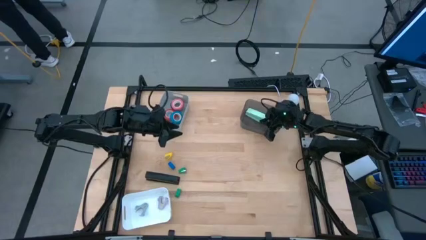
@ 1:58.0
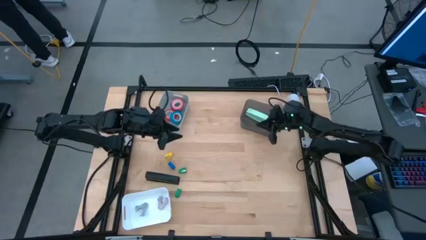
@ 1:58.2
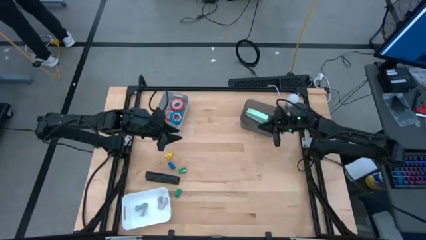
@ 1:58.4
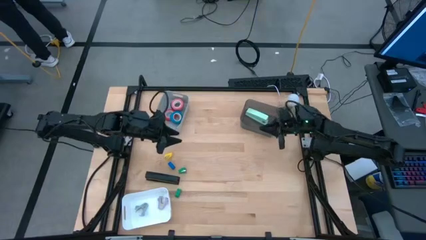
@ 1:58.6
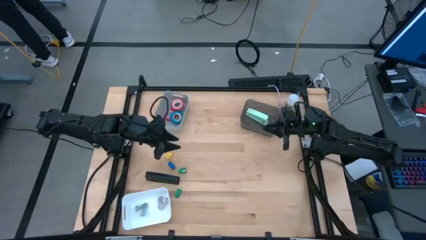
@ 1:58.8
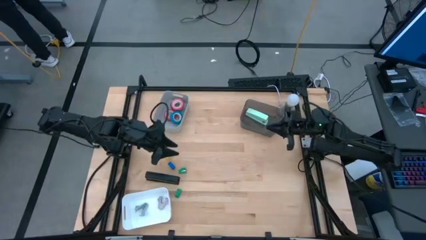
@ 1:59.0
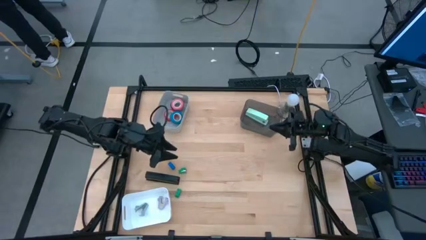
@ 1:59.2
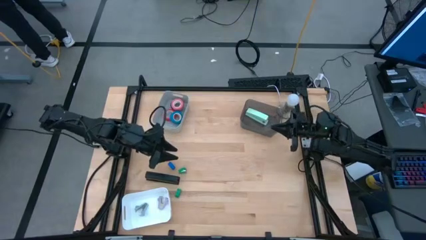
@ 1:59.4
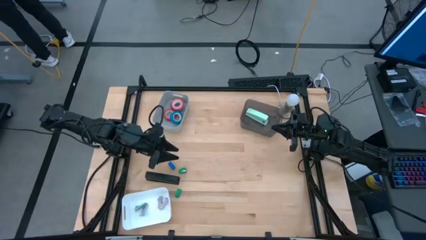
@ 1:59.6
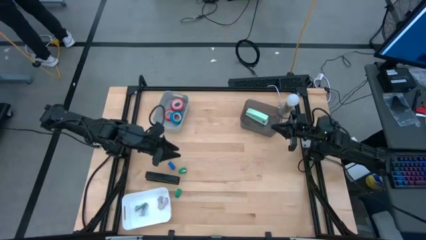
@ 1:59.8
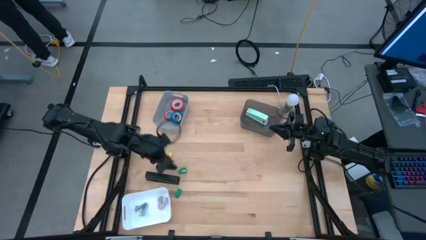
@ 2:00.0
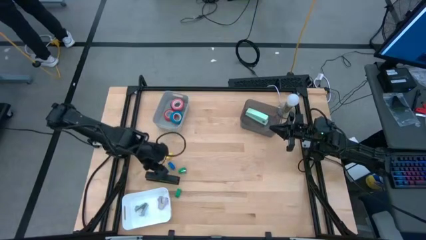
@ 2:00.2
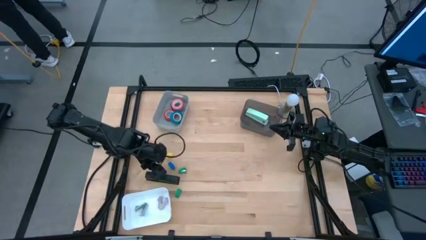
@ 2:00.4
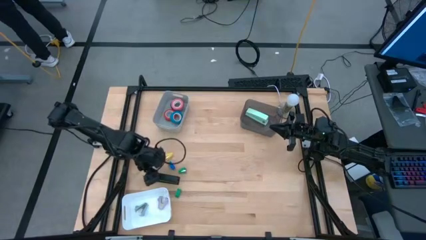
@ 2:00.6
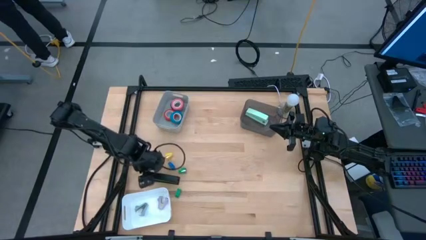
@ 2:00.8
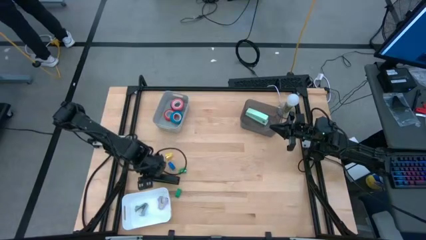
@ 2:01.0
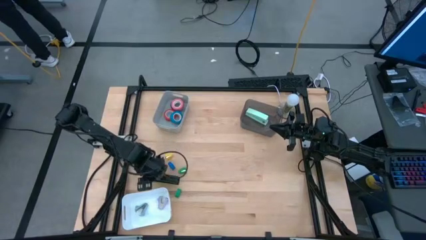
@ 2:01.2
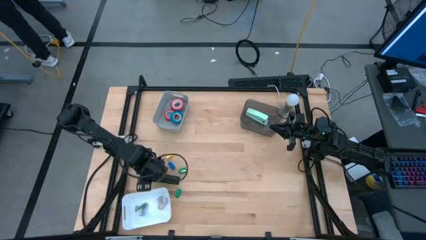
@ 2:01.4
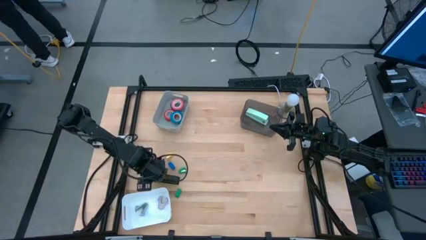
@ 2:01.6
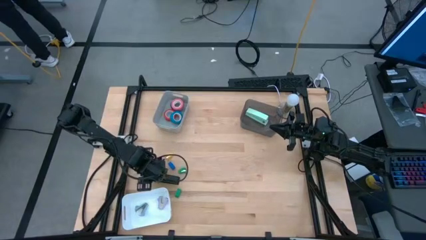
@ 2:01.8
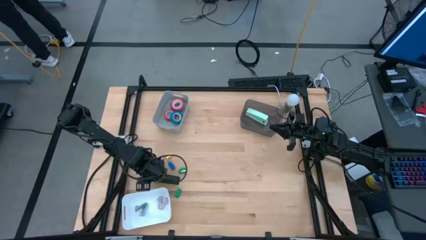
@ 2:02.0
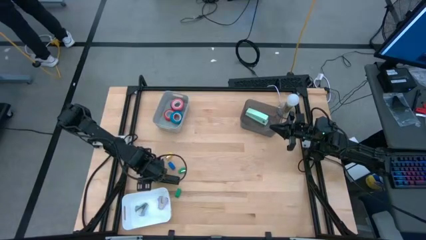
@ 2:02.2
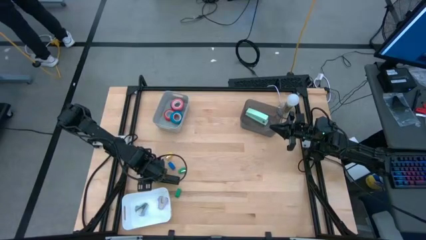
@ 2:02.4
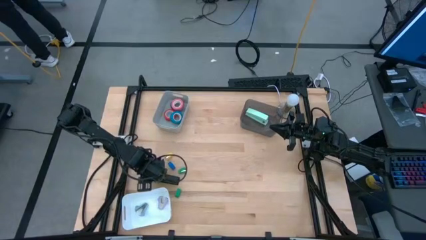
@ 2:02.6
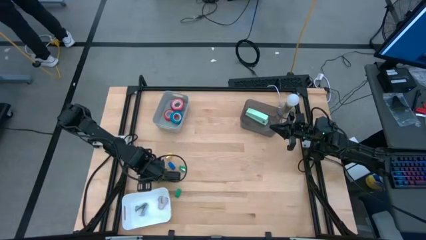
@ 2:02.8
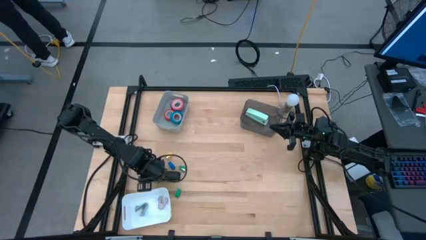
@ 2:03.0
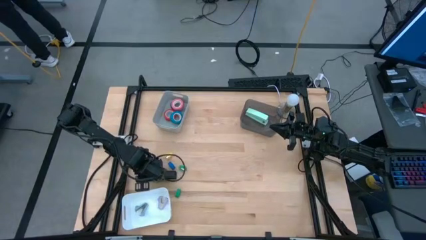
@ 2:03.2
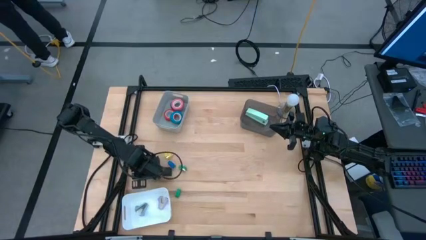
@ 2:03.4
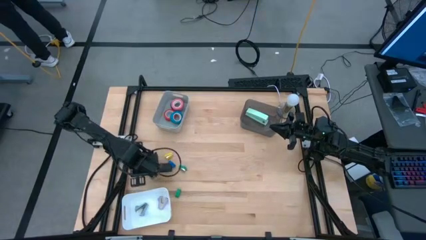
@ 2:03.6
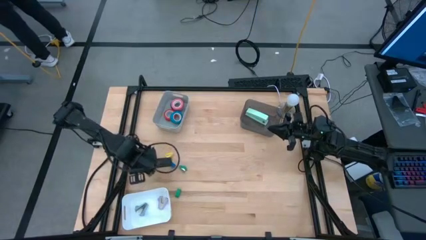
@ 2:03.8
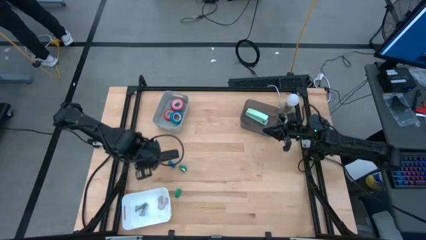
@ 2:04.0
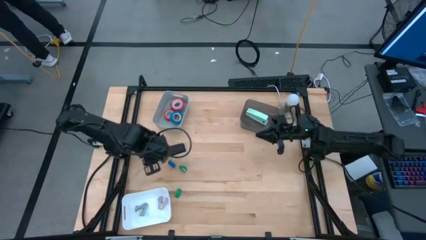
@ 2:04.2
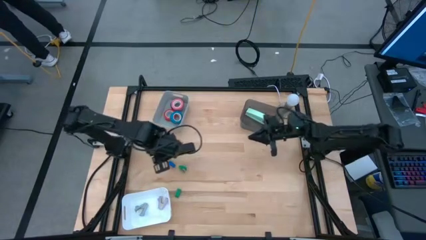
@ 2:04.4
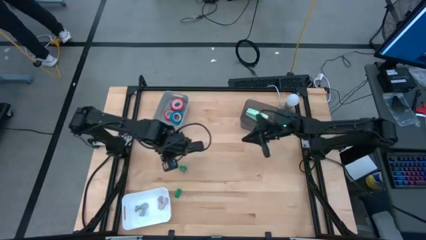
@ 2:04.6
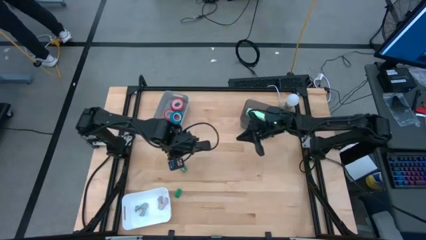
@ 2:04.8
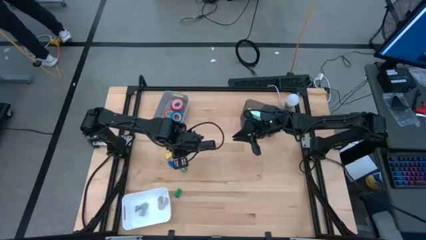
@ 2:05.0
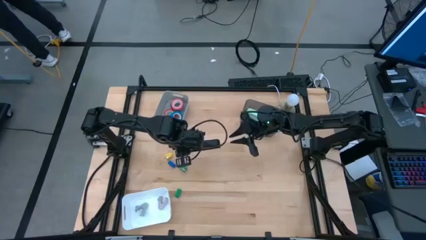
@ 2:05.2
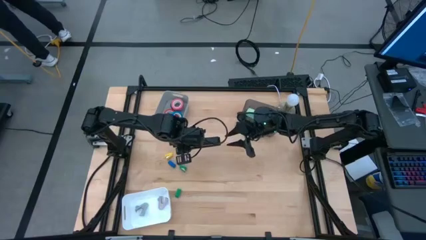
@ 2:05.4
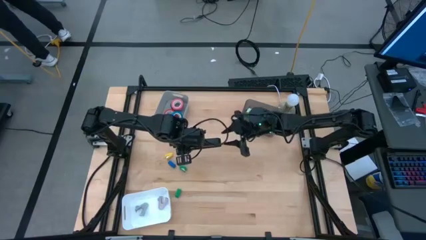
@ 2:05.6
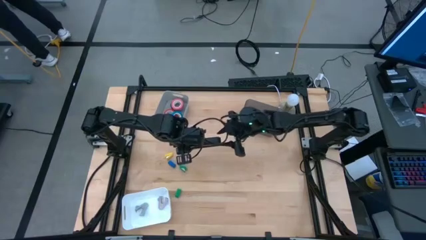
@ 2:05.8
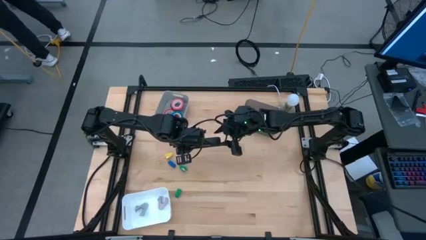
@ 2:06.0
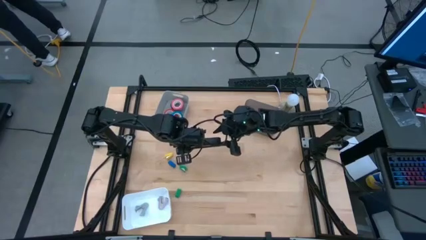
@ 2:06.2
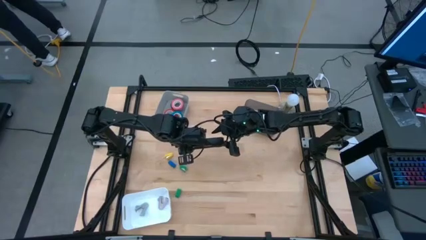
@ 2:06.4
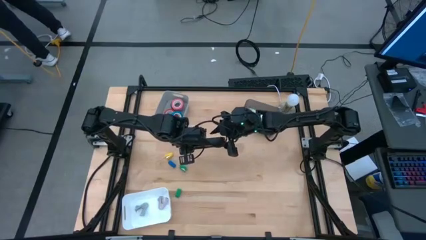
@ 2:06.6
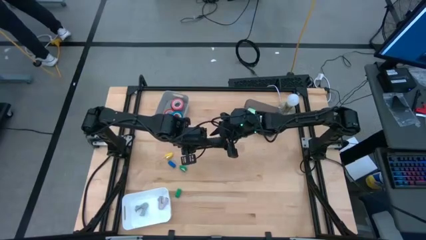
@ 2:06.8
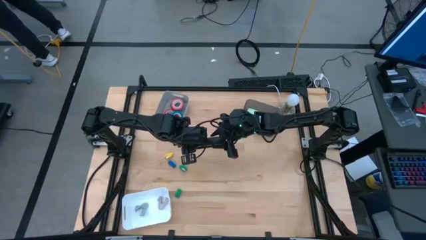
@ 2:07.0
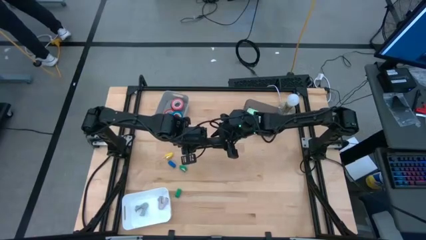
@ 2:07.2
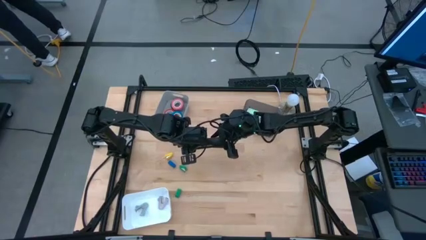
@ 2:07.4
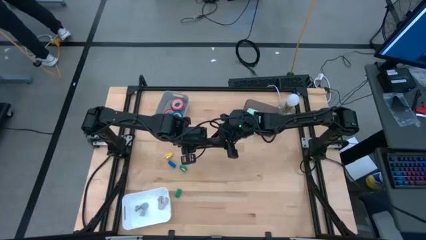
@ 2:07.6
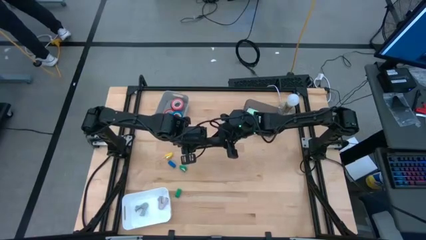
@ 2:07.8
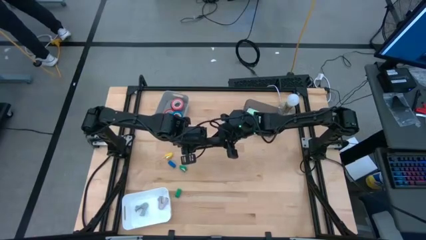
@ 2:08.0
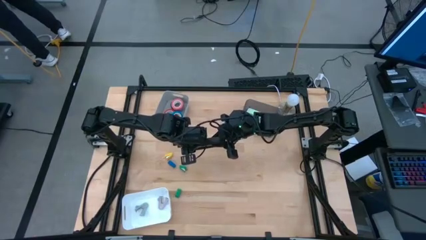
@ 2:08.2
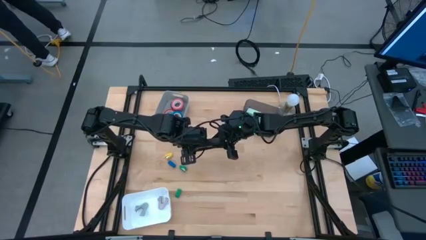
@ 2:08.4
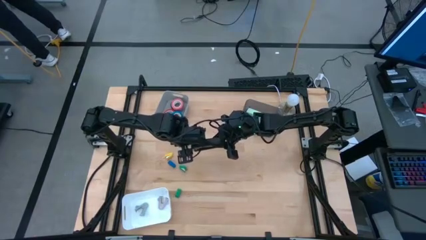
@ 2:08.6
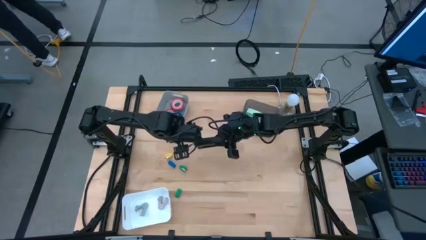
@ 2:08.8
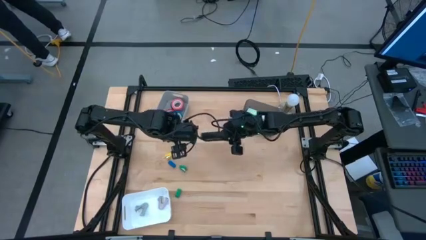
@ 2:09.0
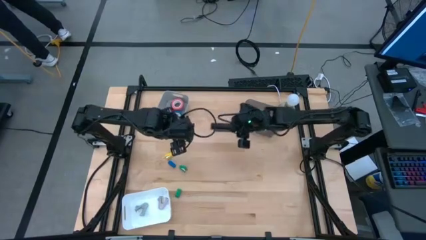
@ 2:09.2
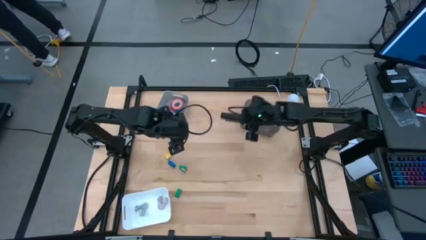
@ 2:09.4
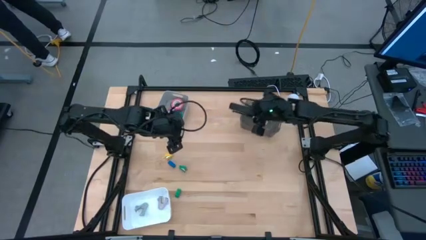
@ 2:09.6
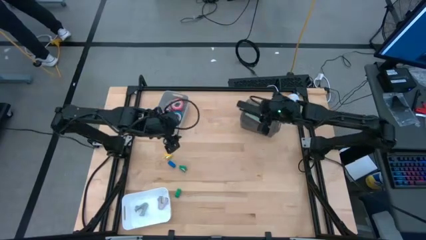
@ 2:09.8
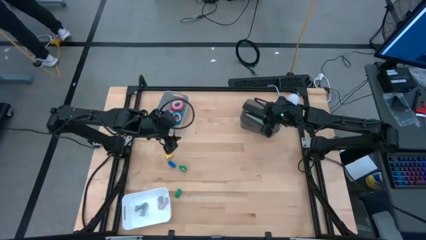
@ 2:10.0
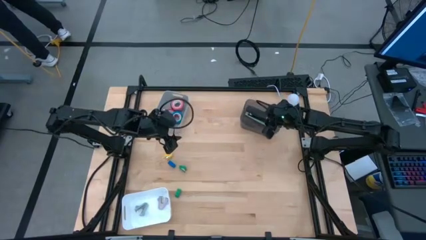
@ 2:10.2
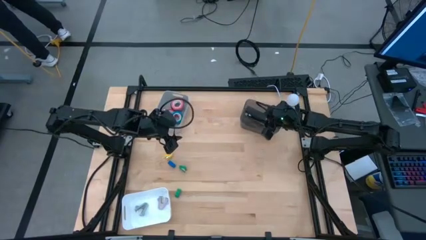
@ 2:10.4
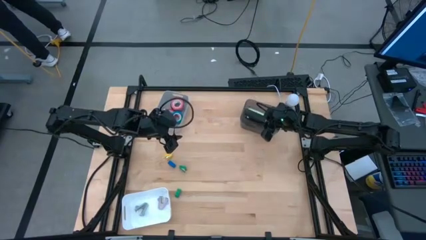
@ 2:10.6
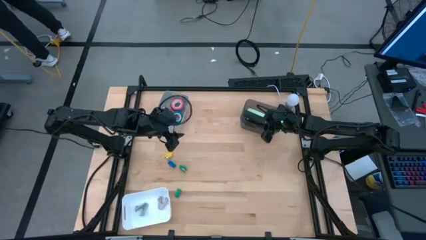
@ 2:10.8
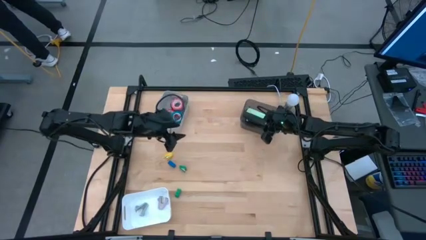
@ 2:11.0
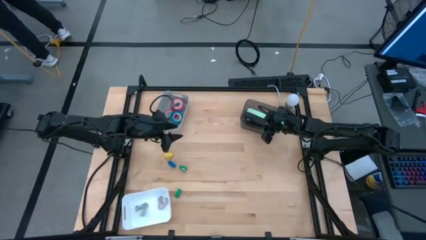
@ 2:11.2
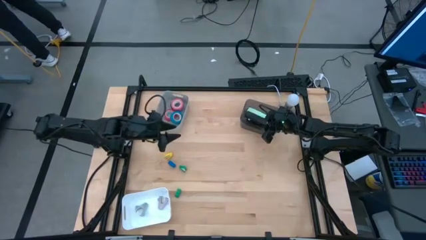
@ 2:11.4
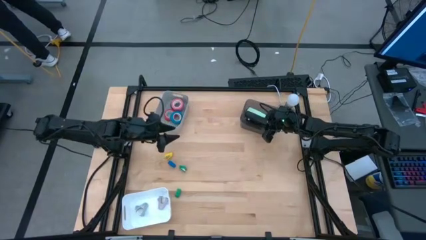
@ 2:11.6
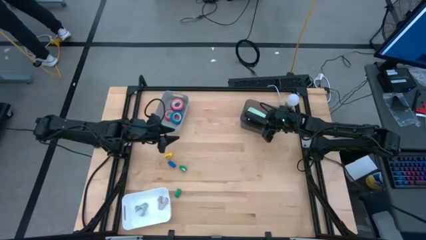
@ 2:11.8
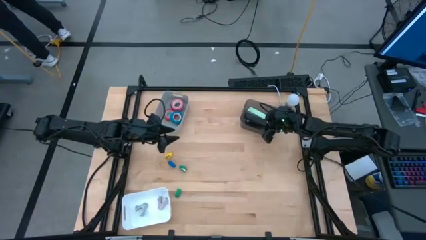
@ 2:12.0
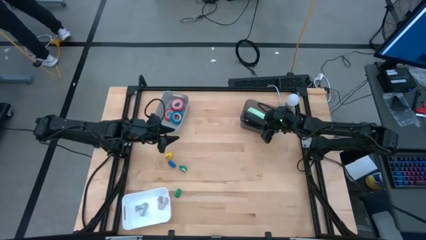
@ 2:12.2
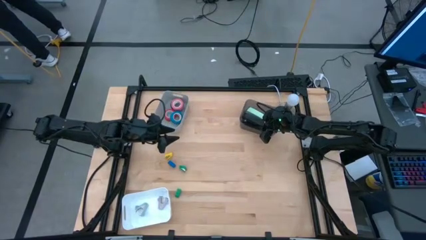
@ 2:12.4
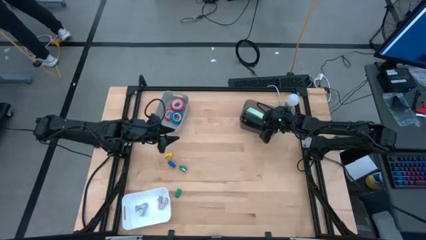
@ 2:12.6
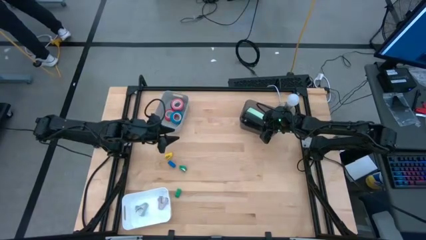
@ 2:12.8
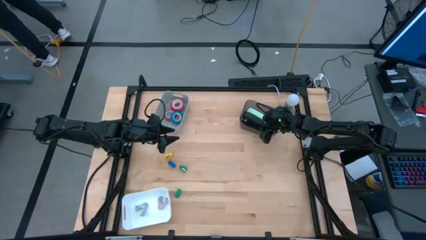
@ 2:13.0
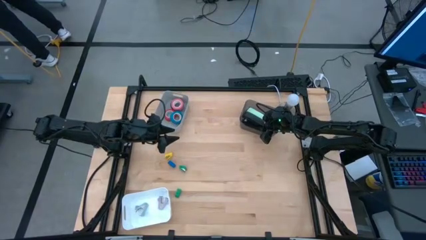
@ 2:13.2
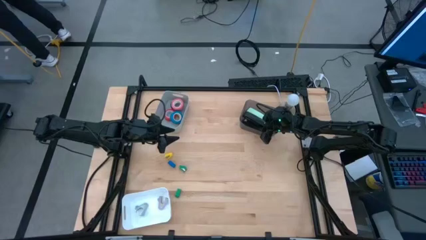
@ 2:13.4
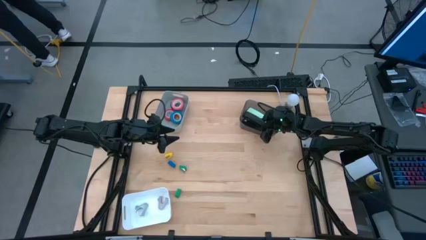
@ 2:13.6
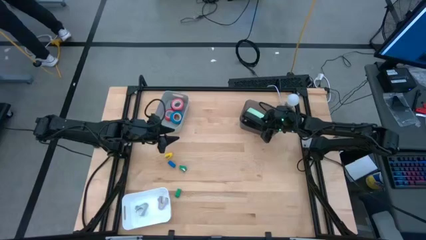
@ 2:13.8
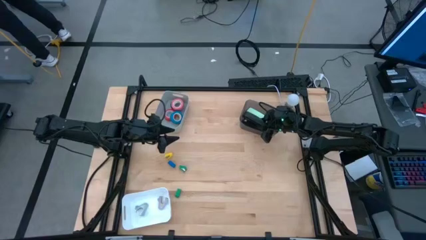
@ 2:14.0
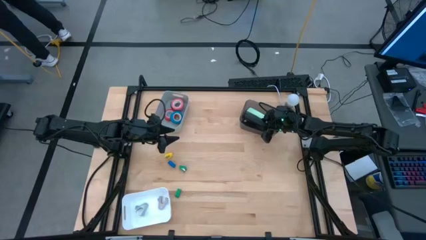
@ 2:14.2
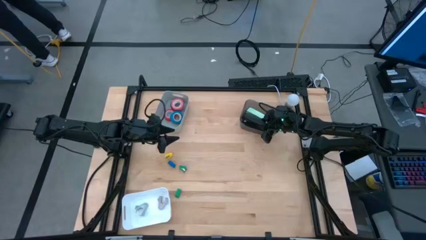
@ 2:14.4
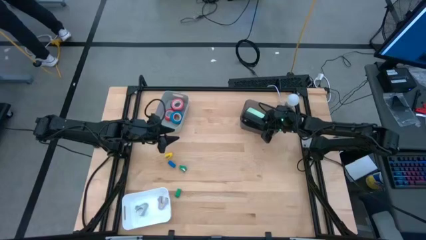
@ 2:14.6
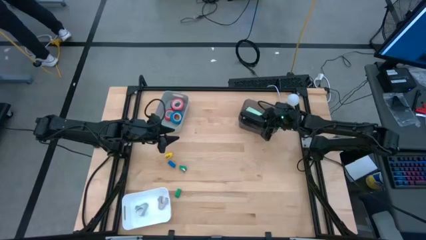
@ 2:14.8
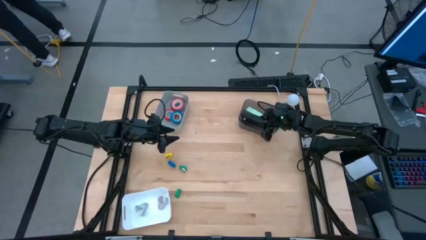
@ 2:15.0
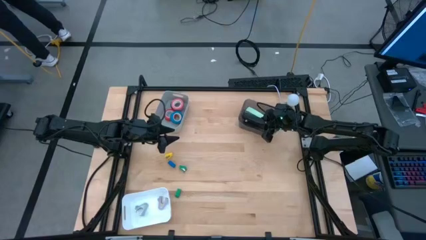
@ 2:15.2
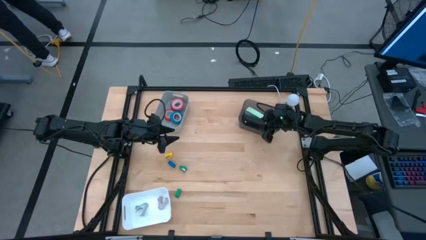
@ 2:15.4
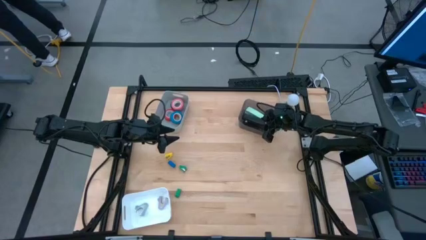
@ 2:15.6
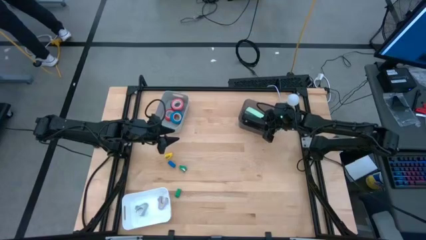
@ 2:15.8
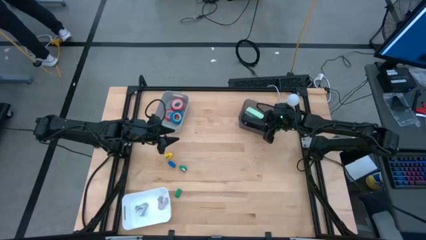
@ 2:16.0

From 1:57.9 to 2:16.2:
Task: Pick and place Stapler, Stapler remover, tape
Put the black stapler into the black bin
